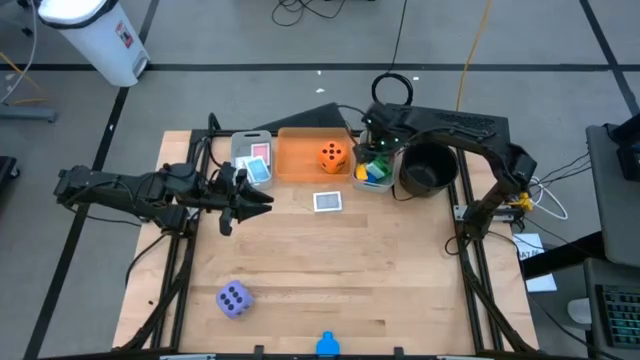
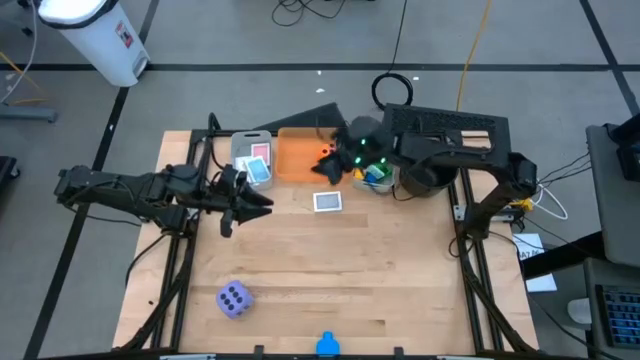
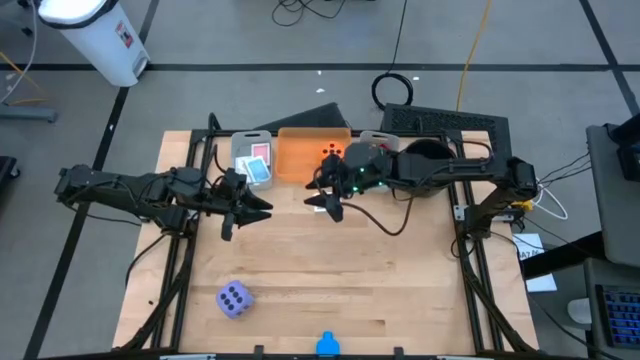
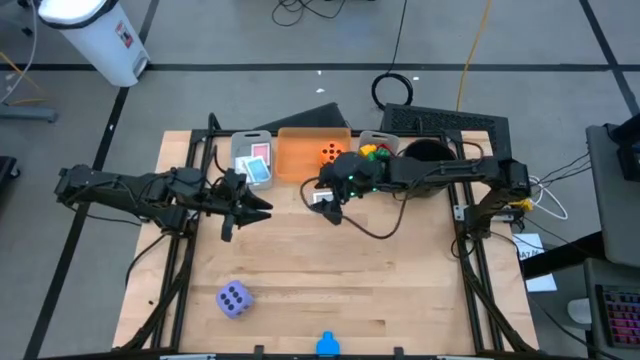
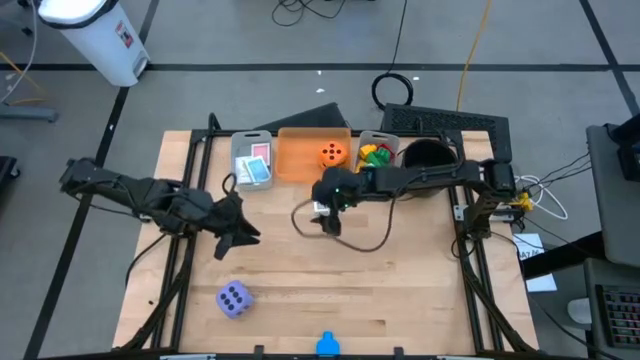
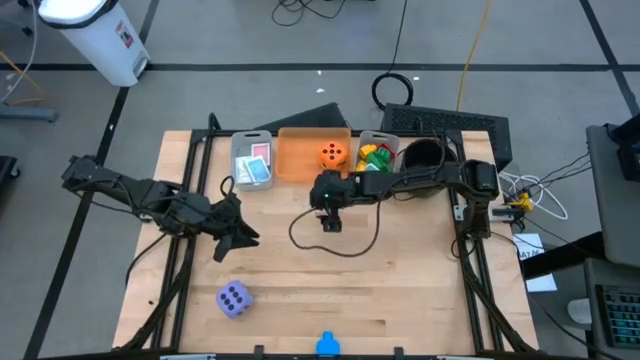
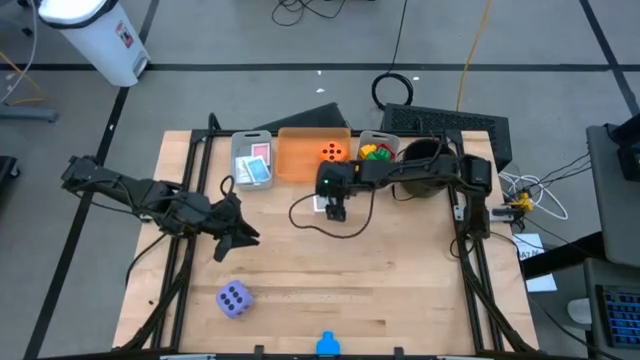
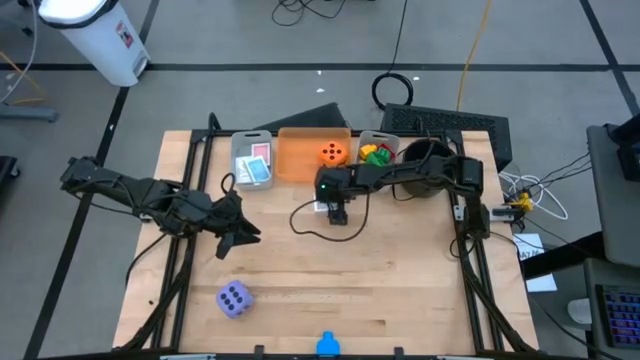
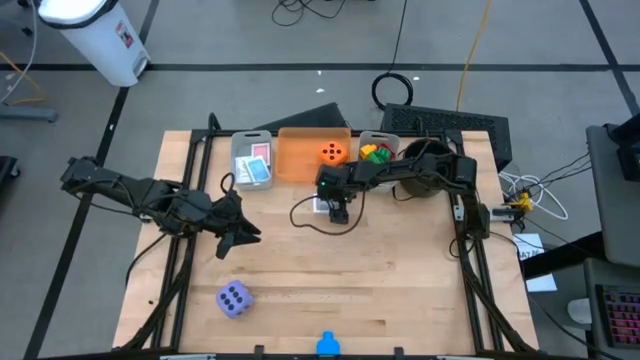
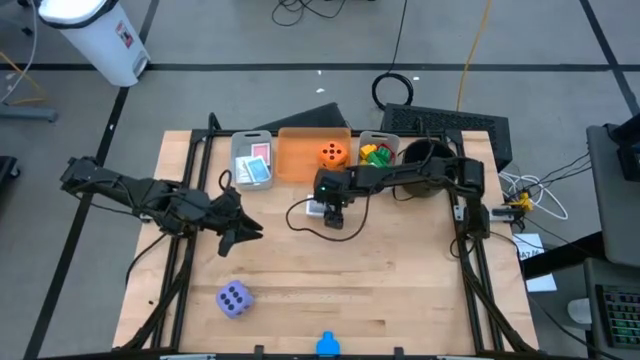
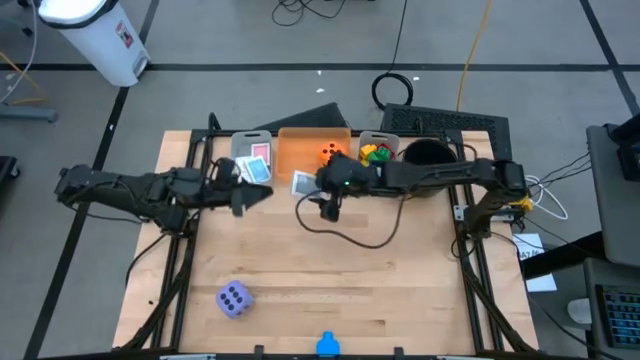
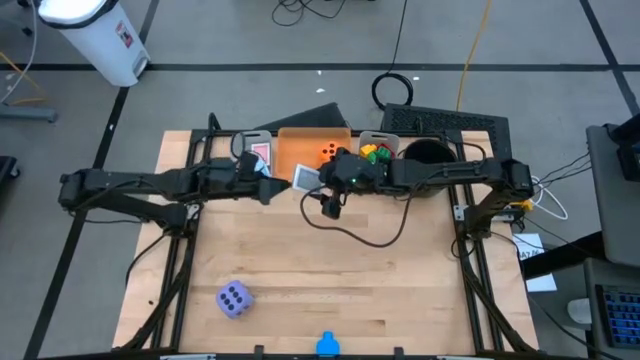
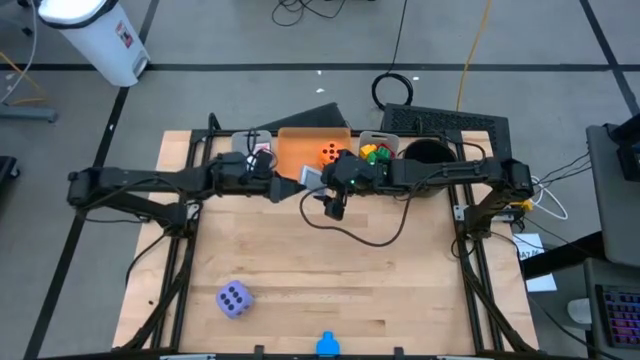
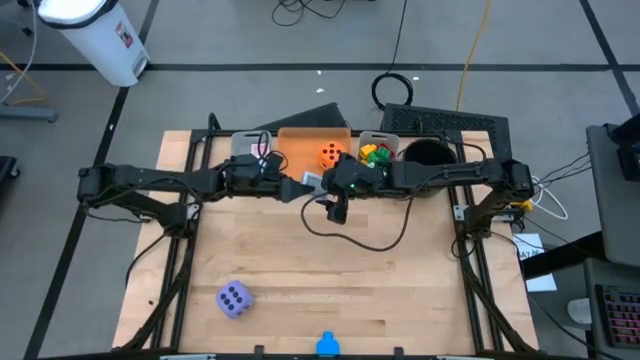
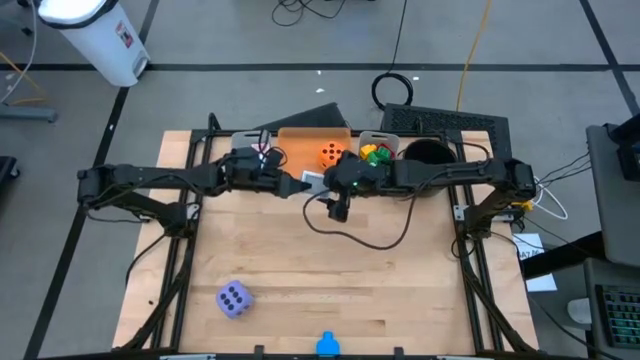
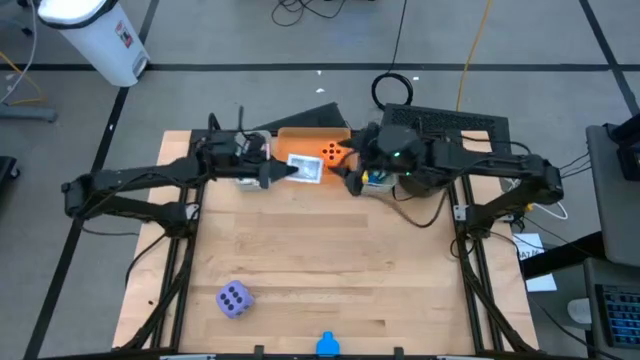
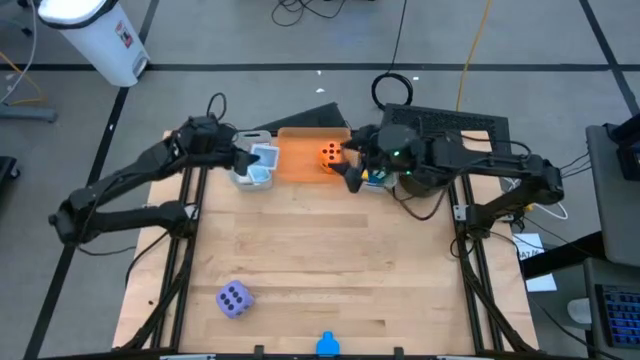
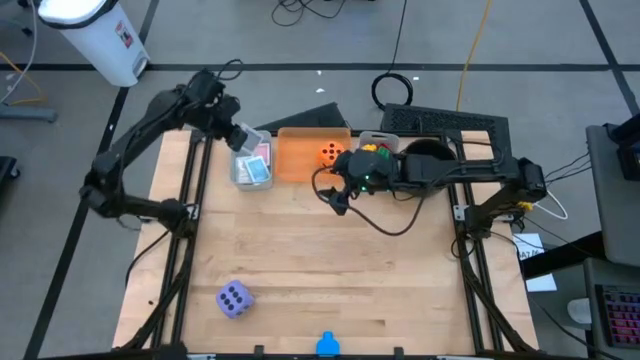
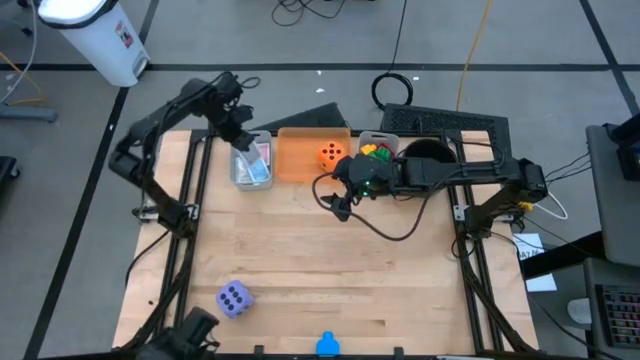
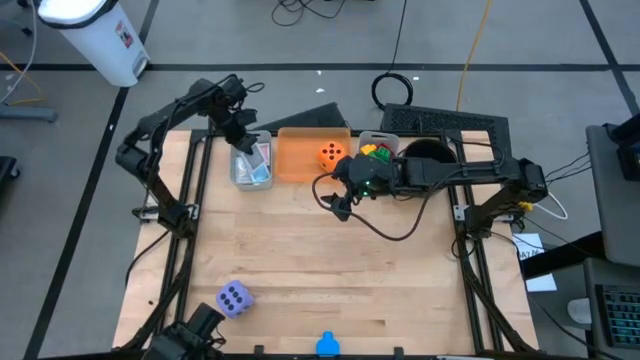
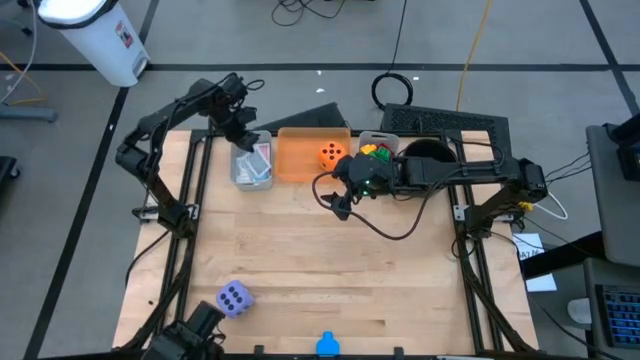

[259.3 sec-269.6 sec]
Task: Pick & Place Toys
Put the black deck of cards into the left gray bin

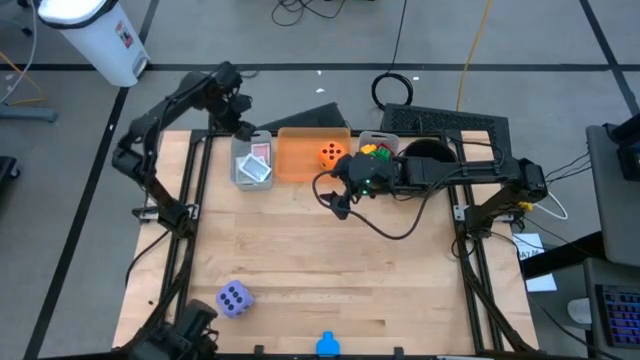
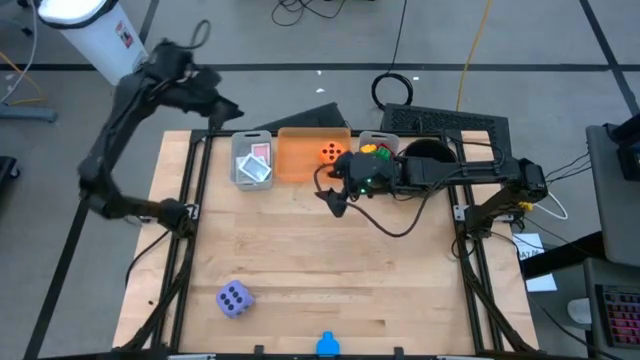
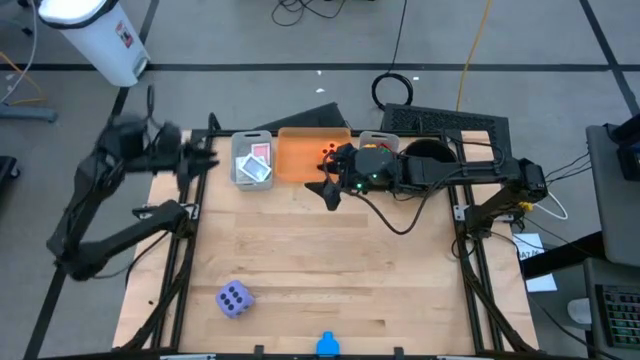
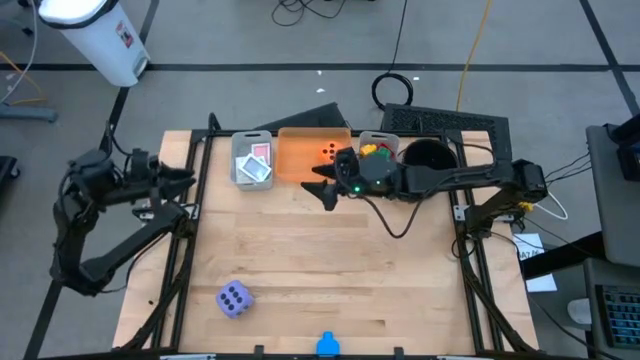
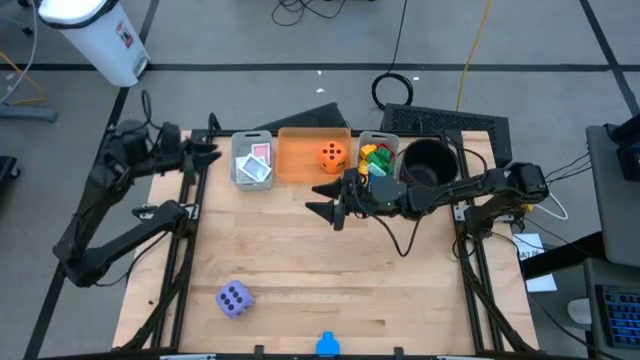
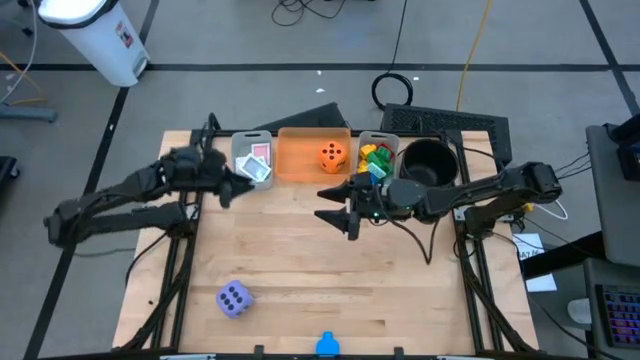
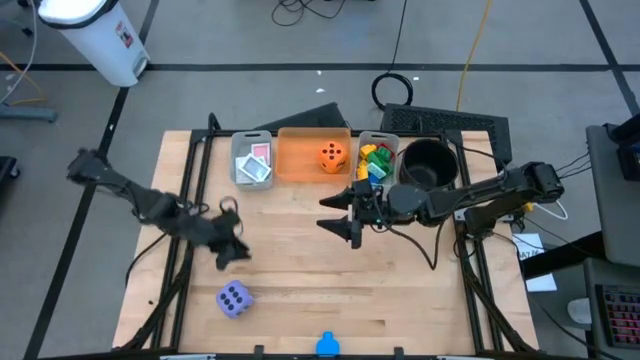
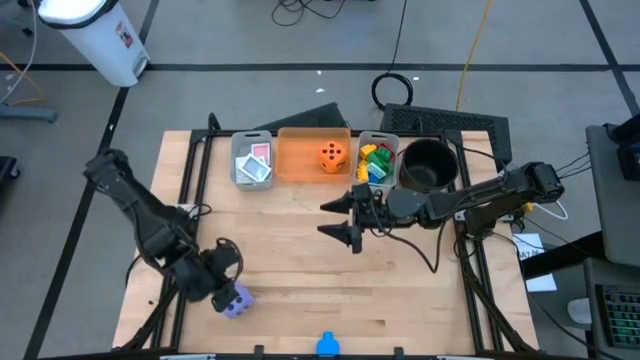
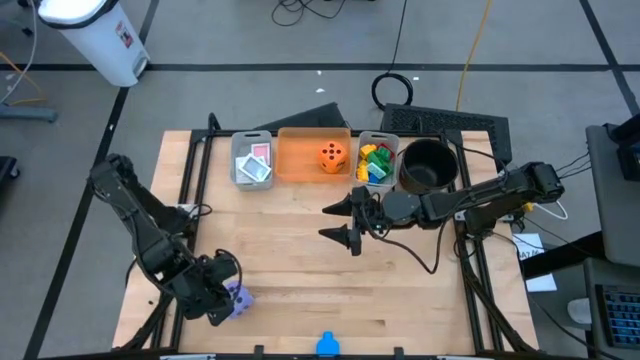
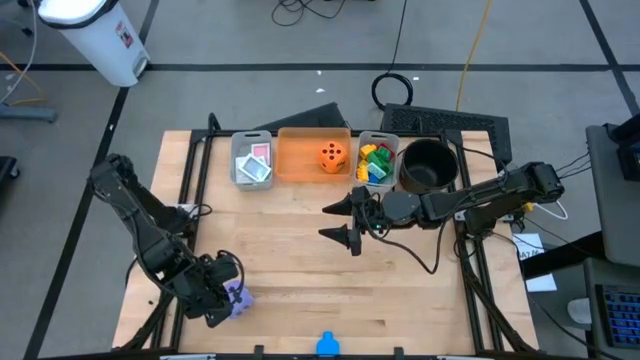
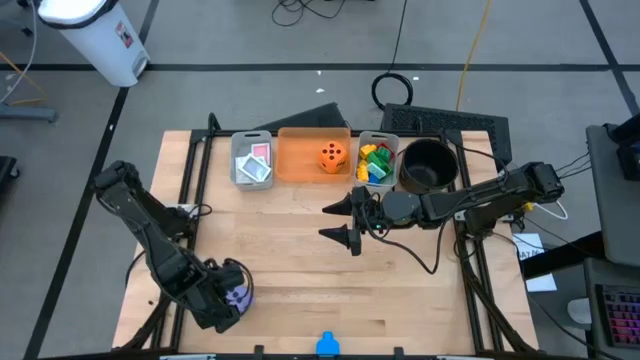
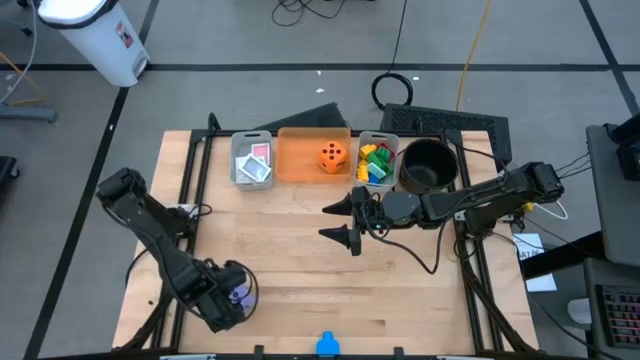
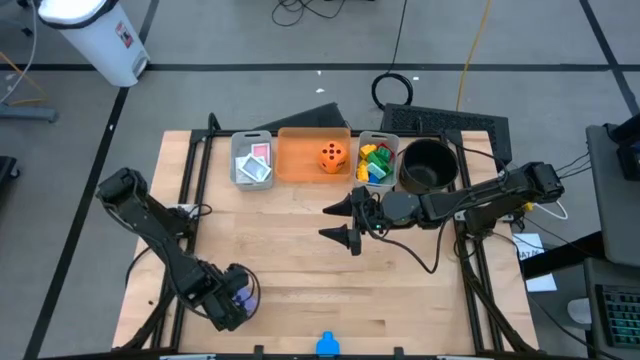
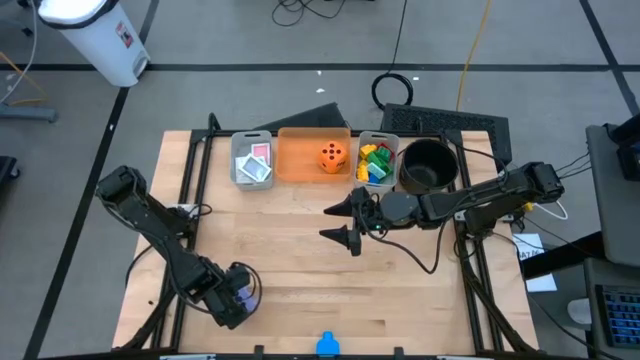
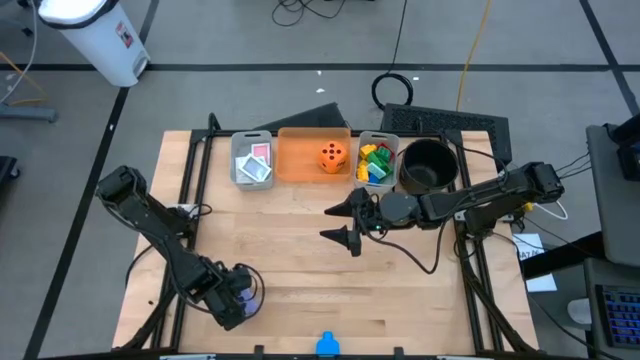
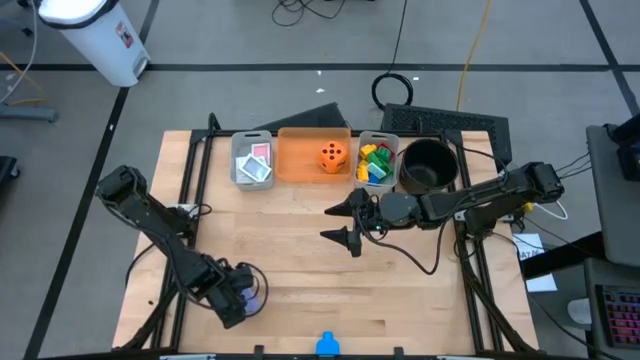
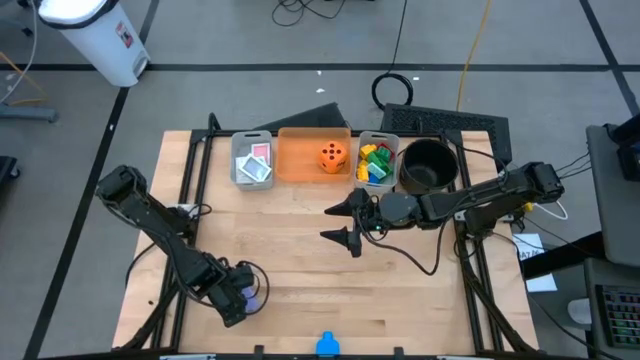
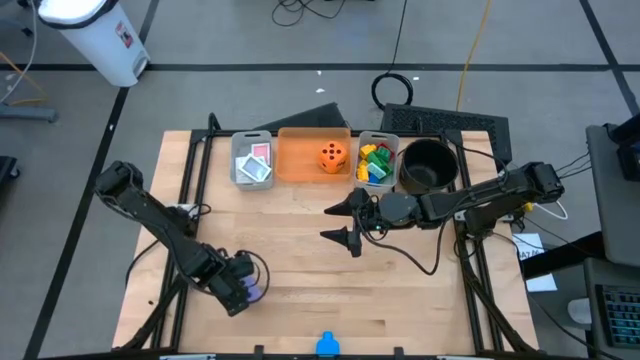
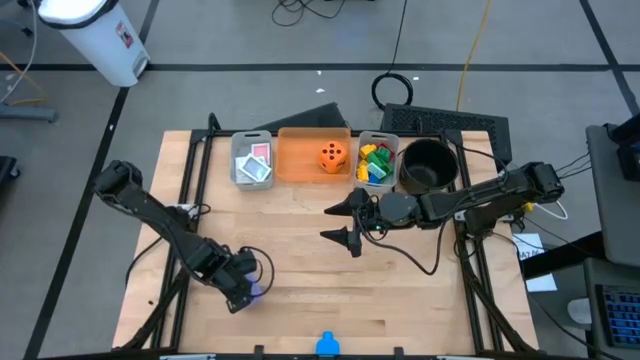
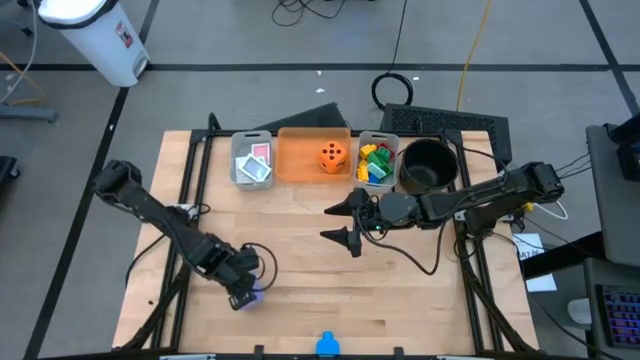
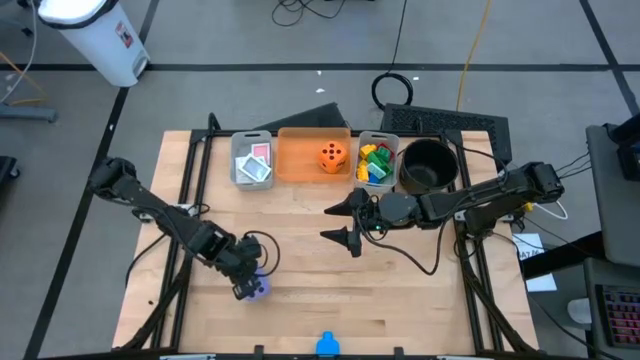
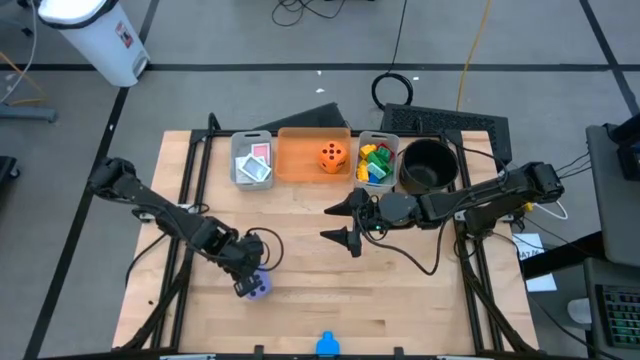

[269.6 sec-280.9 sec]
Put the purple dice into the orange bin
